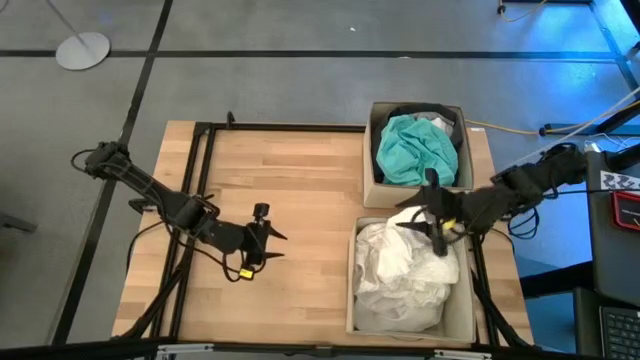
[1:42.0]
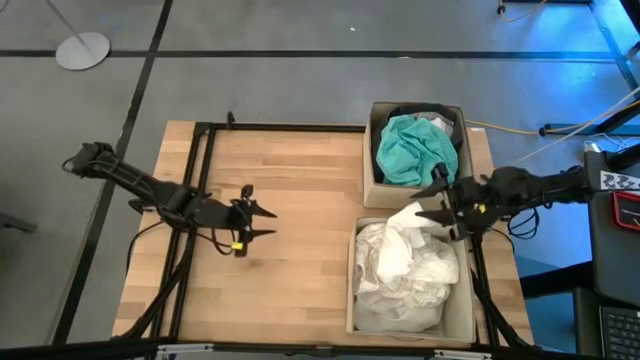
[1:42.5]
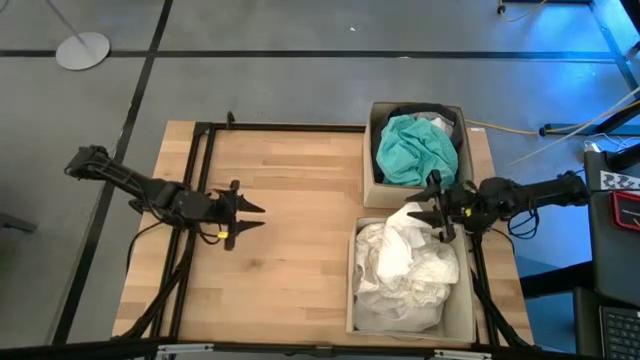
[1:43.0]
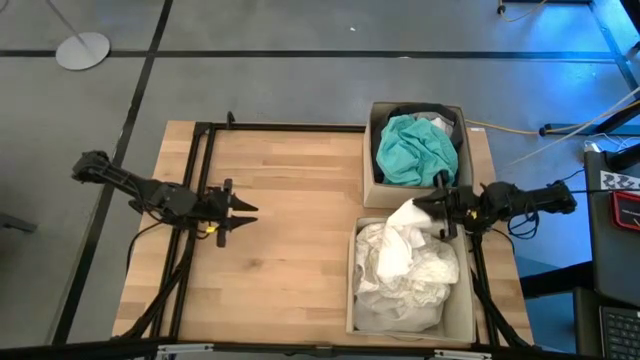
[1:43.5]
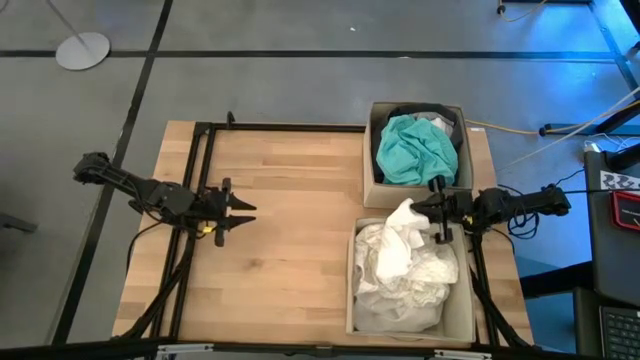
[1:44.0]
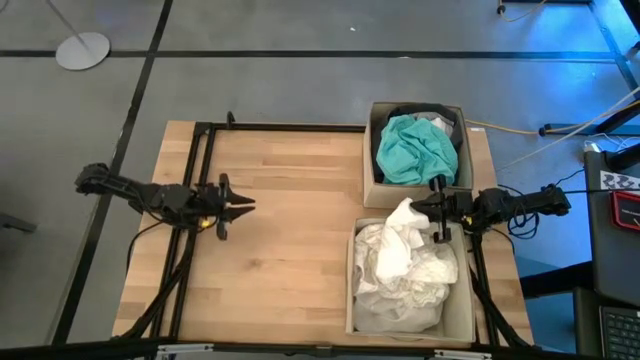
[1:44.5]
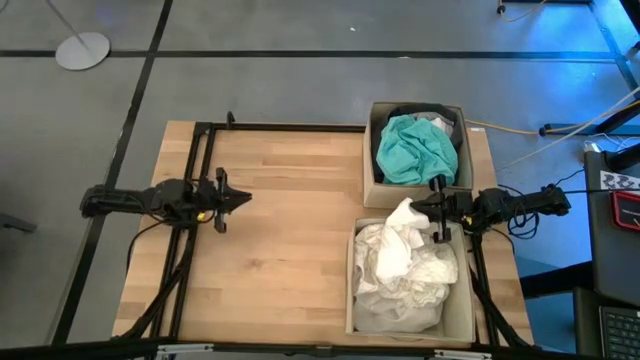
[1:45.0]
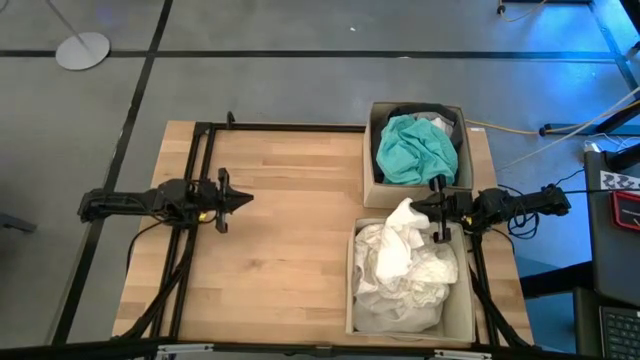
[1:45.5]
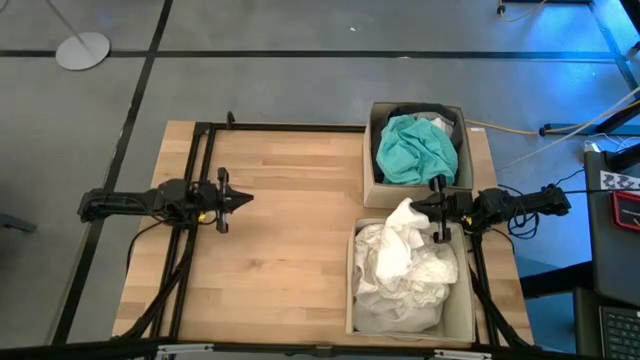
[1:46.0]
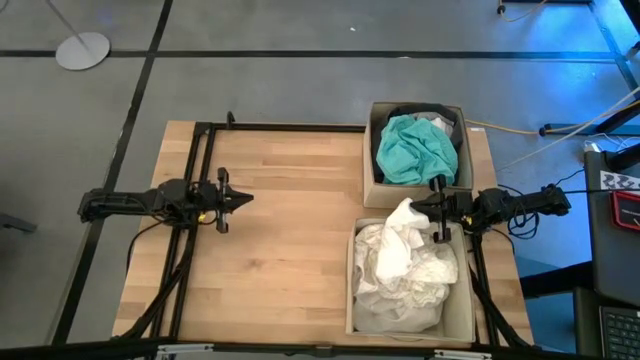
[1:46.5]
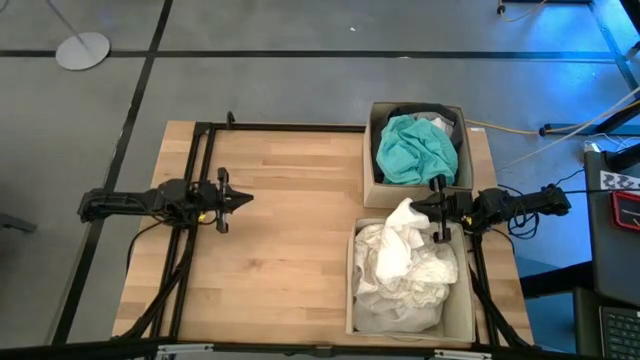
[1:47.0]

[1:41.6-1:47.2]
Task: Sort clothes
Return to Home Position

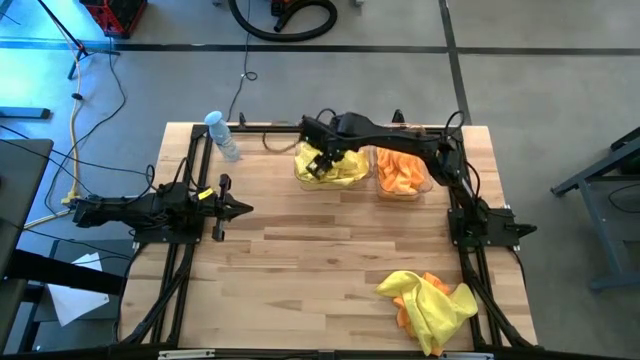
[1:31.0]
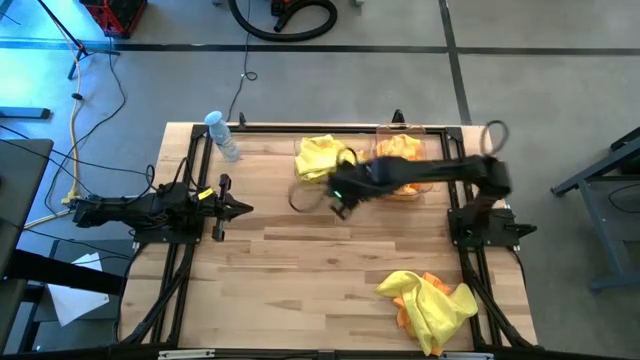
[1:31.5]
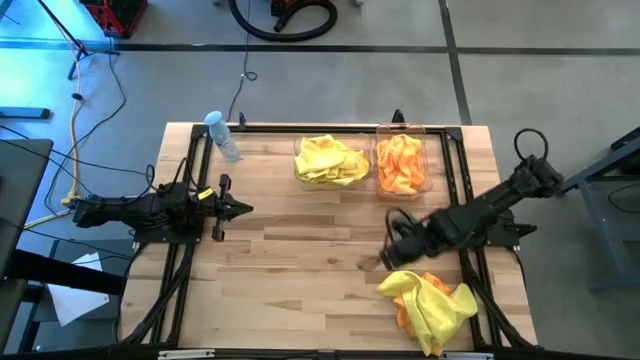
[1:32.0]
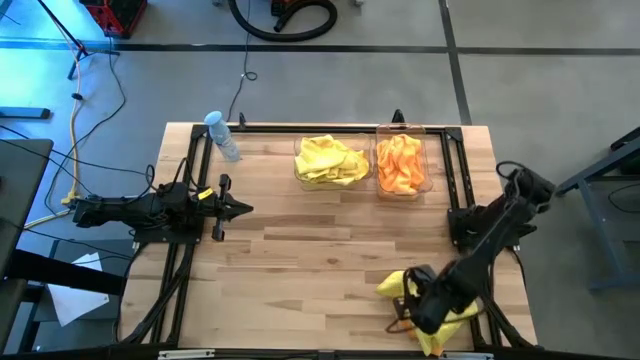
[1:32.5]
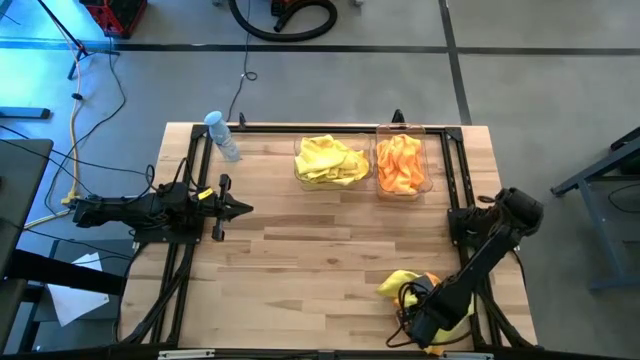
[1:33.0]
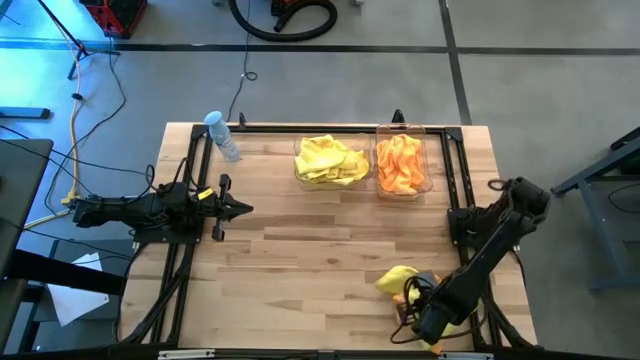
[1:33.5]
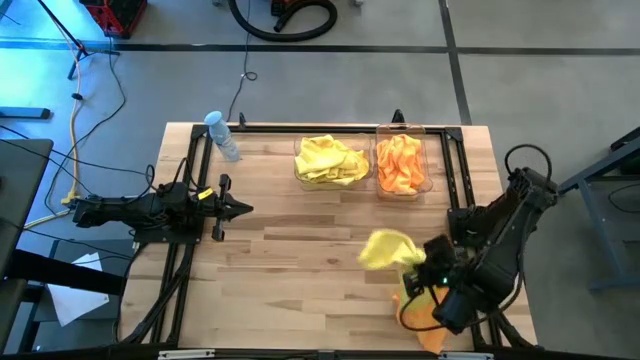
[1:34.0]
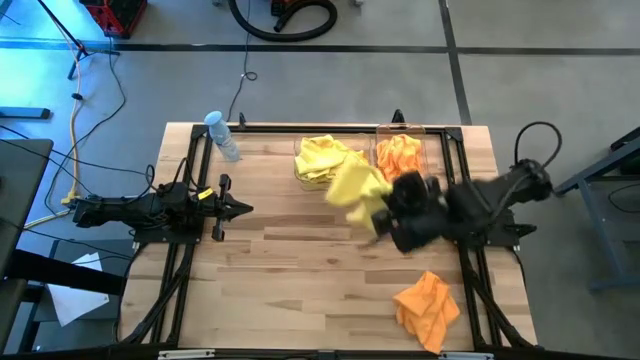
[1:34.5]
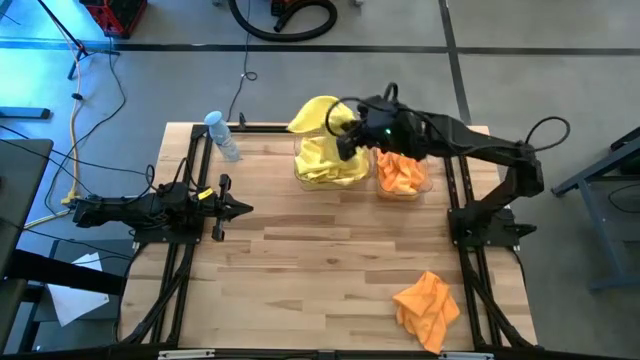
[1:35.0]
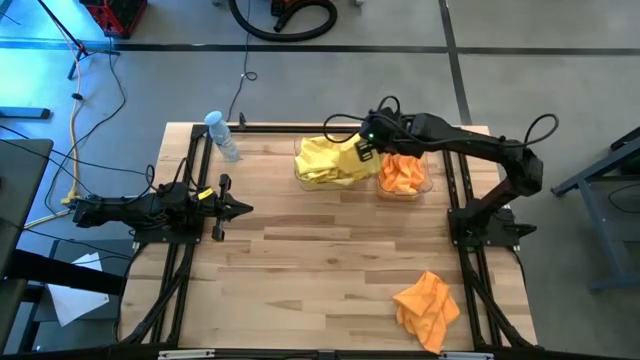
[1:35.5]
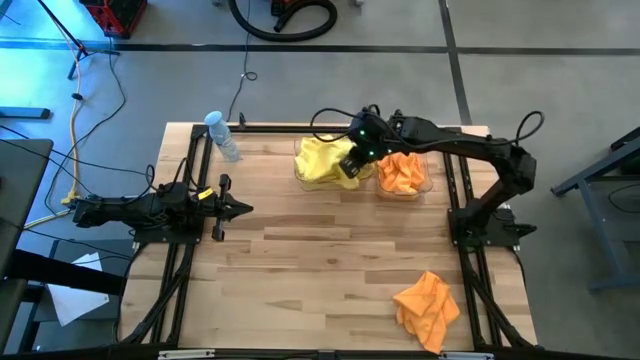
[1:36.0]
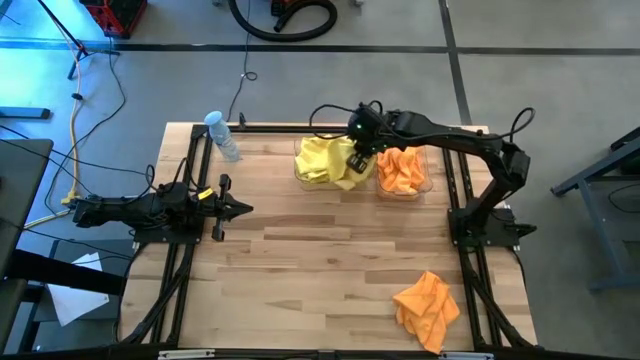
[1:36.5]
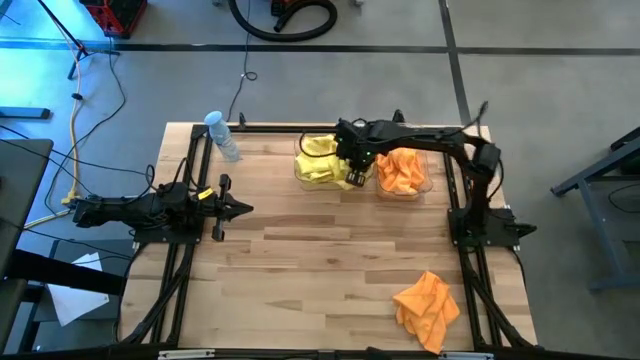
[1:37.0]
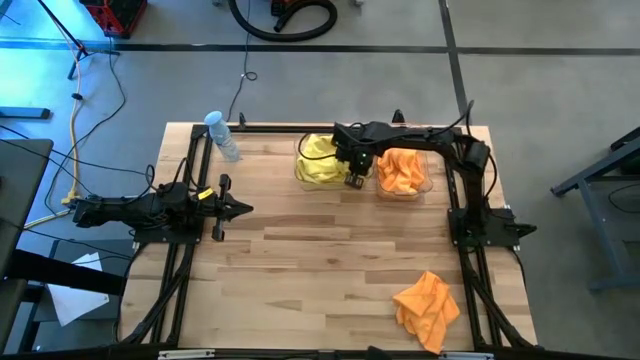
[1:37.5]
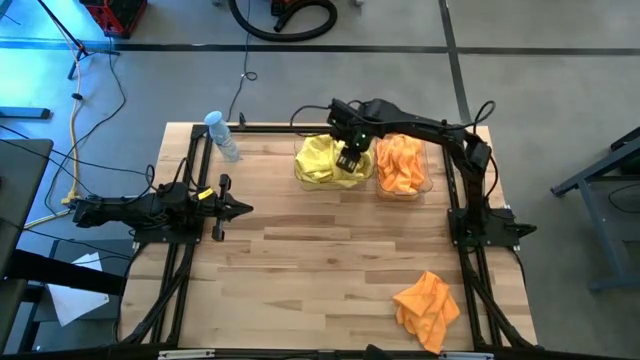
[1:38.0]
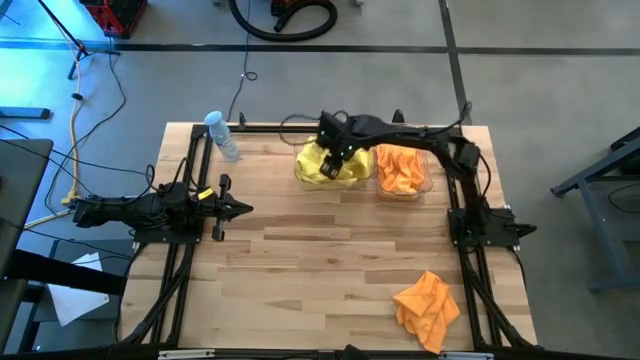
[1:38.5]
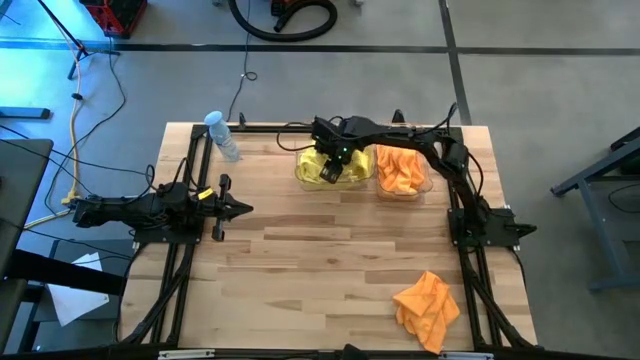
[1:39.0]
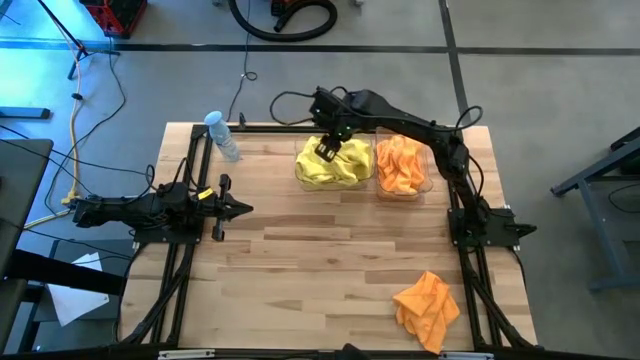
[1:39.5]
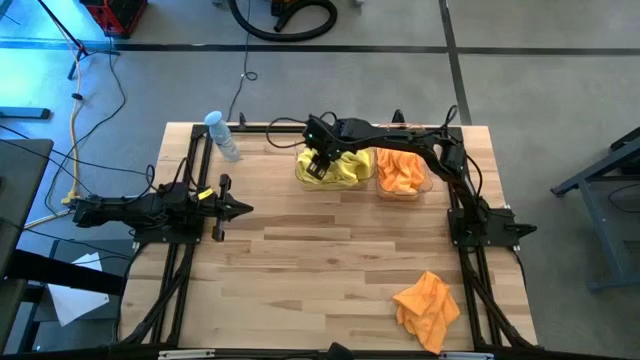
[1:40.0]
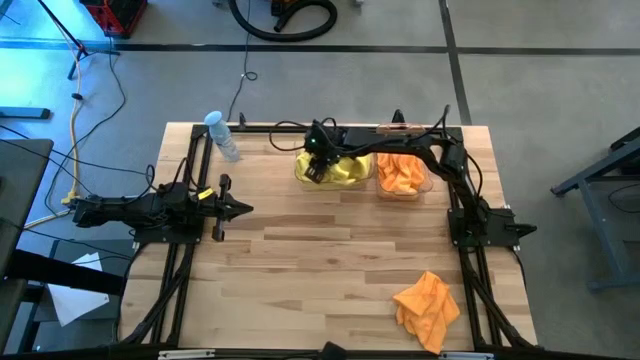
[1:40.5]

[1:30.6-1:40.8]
Task: Sort microfiber towel by color & place in baskets
Put the yellow microfiber towel into the left transparent bin

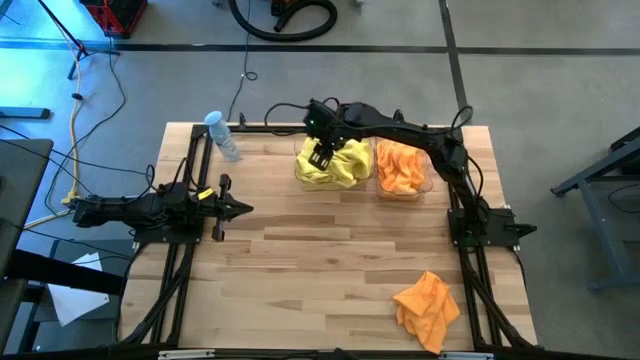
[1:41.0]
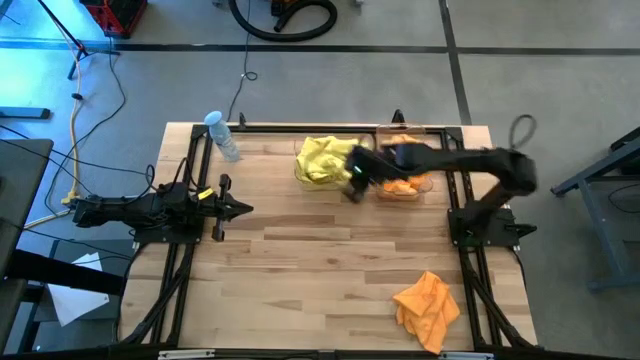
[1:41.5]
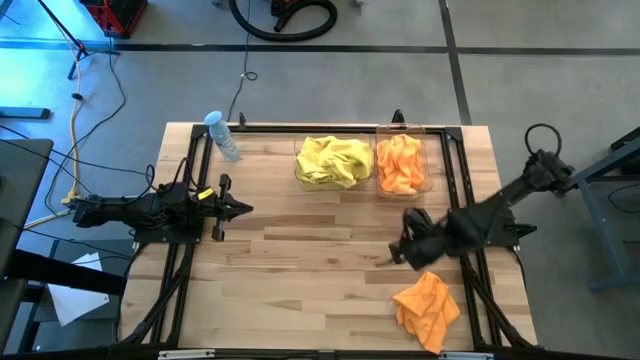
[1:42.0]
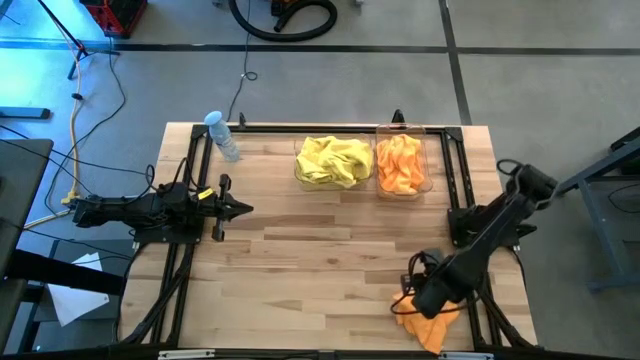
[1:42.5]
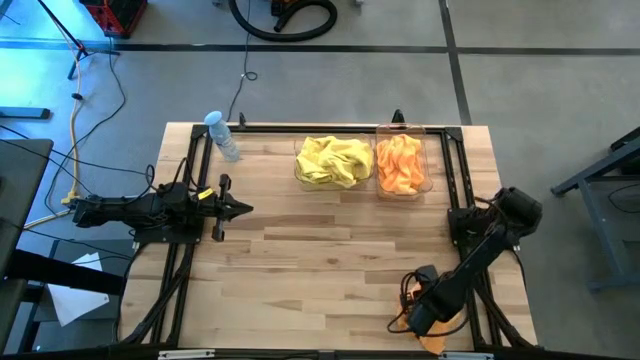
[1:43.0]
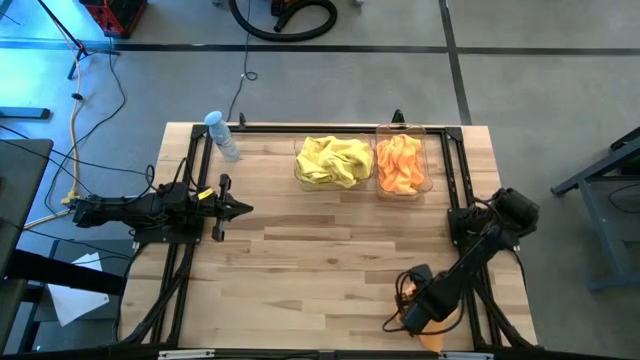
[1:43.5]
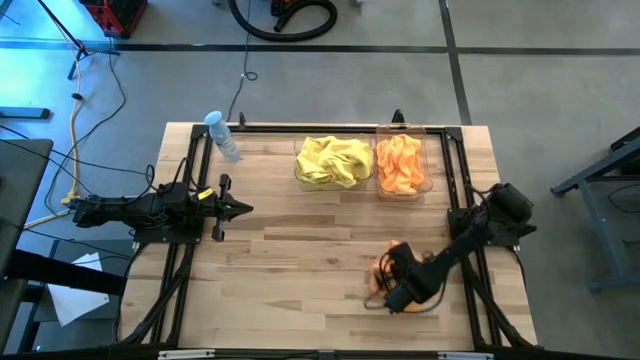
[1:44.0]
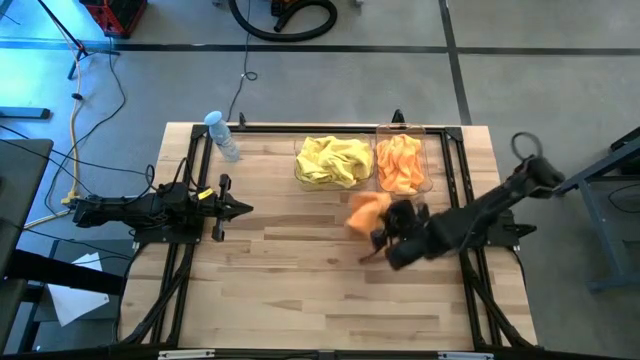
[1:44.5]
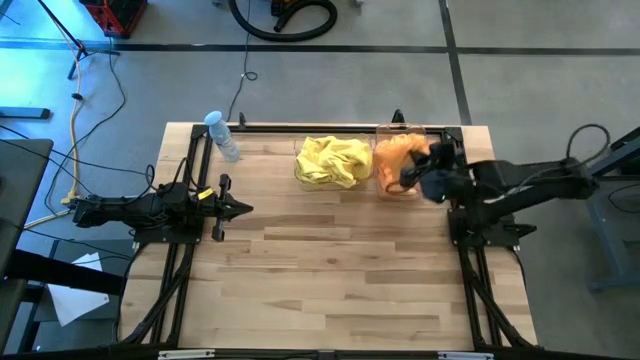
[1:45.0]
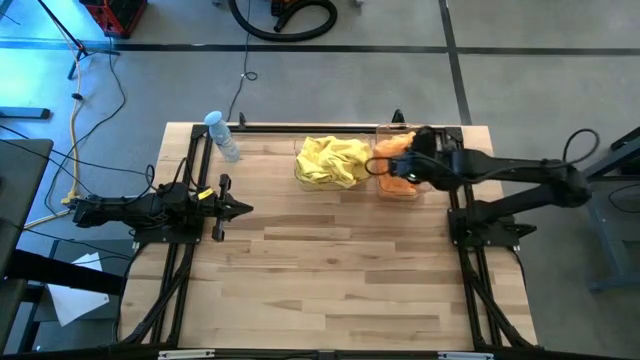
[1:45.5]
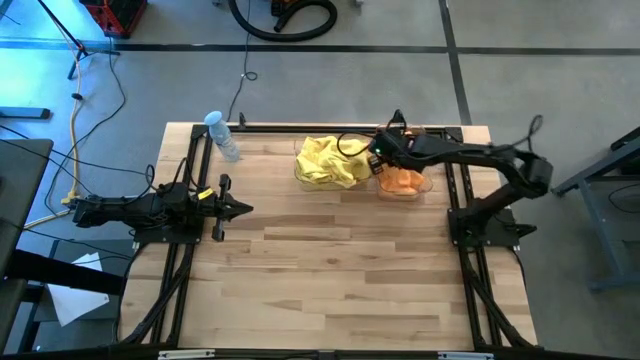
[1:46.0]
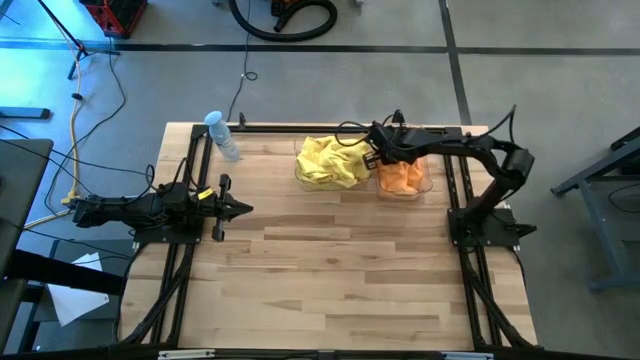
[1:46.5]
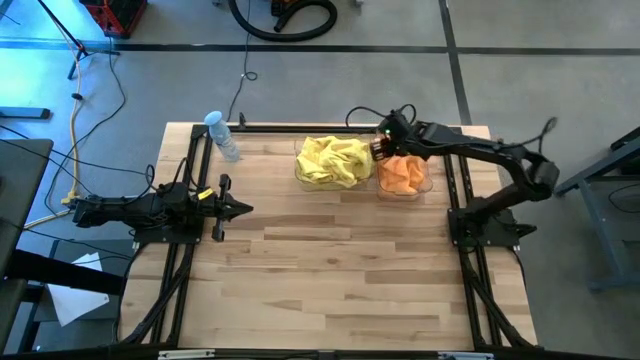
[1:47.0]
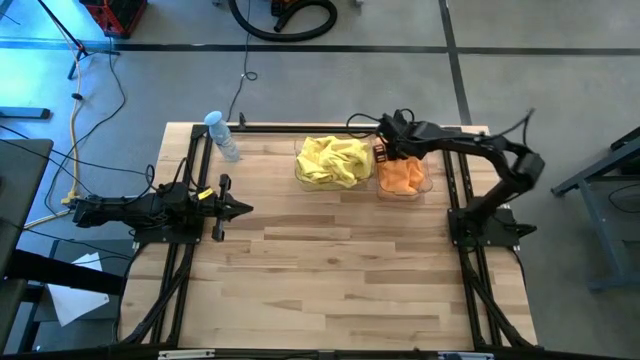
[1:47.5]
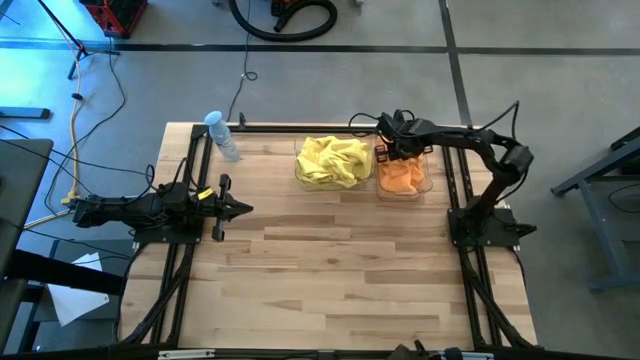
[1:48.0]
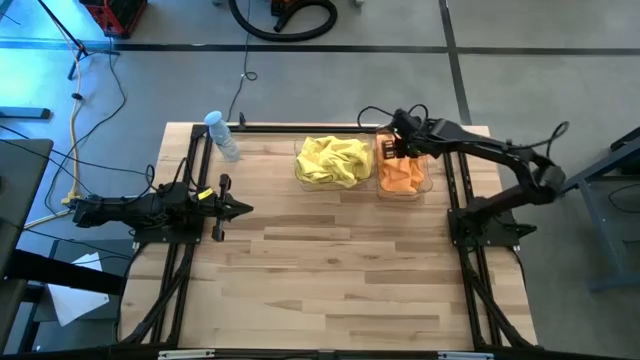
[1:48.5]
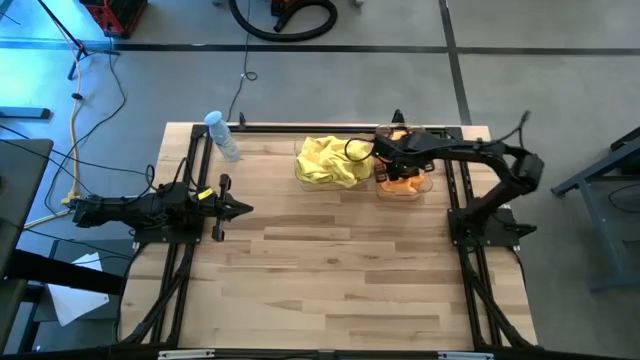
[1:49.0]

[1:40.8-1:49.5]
Put the orange microfiber towel into the right transparent bin
